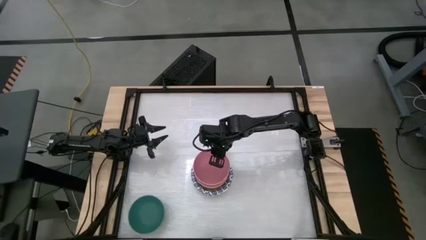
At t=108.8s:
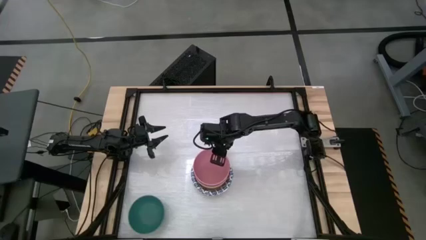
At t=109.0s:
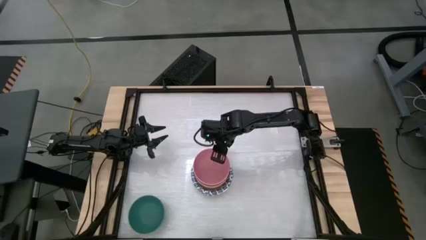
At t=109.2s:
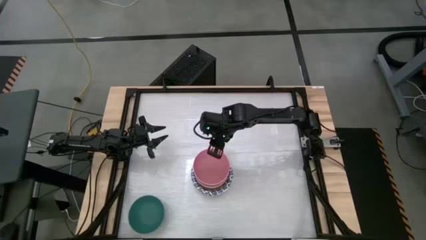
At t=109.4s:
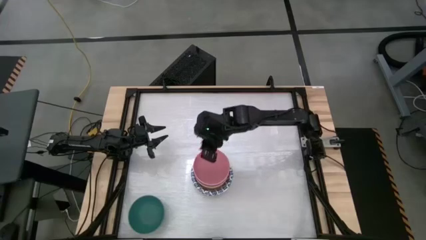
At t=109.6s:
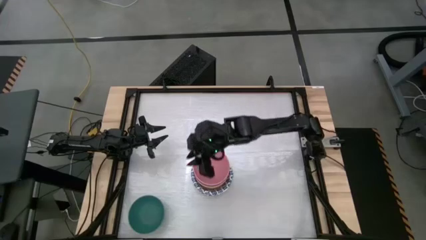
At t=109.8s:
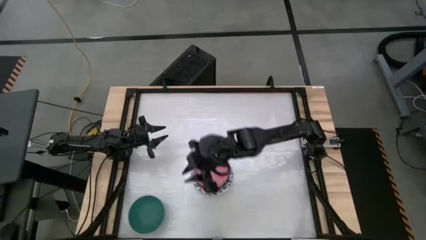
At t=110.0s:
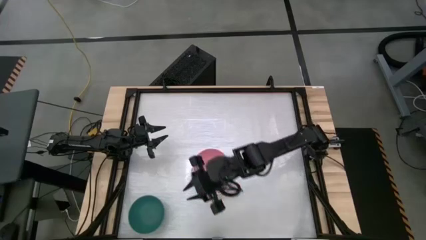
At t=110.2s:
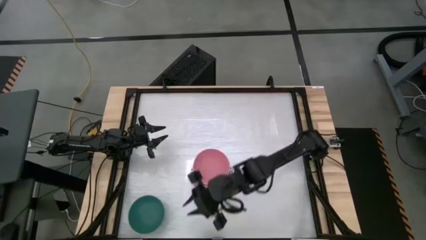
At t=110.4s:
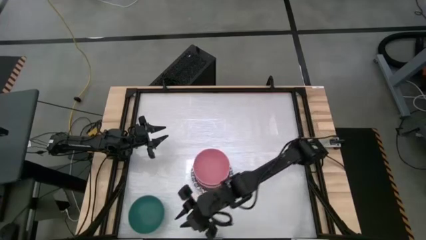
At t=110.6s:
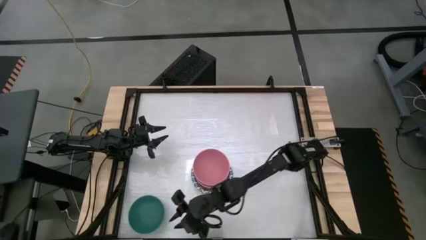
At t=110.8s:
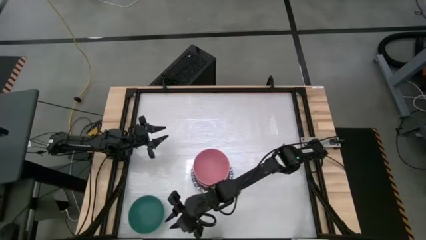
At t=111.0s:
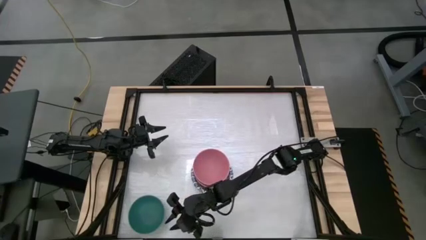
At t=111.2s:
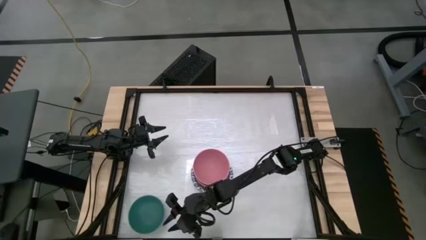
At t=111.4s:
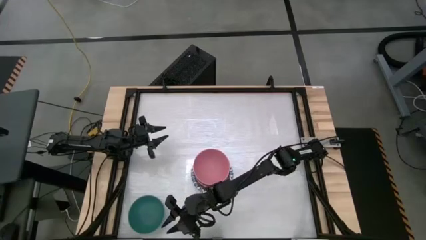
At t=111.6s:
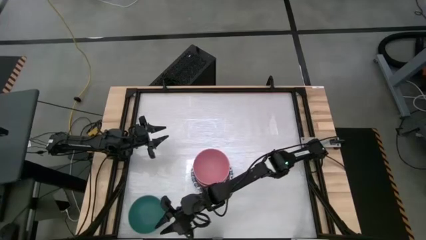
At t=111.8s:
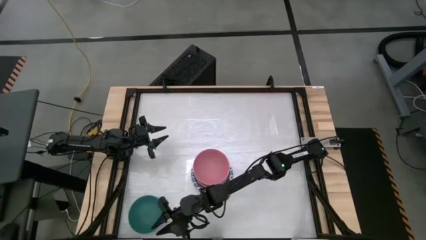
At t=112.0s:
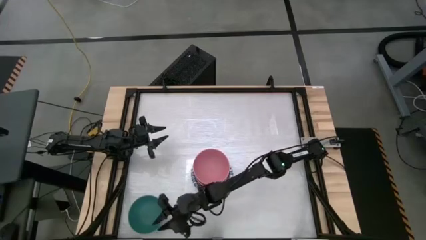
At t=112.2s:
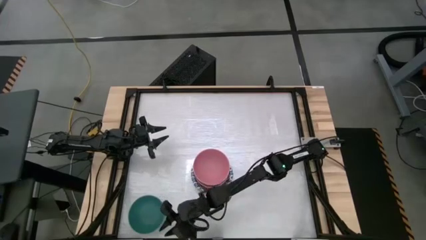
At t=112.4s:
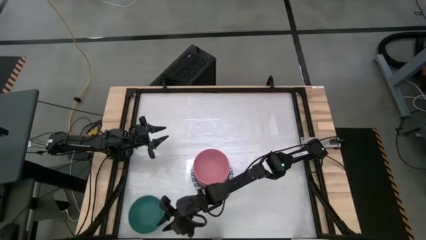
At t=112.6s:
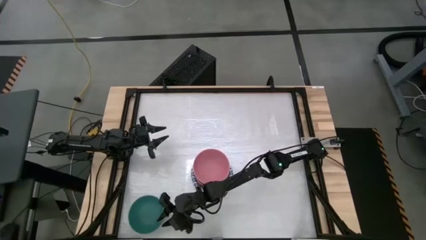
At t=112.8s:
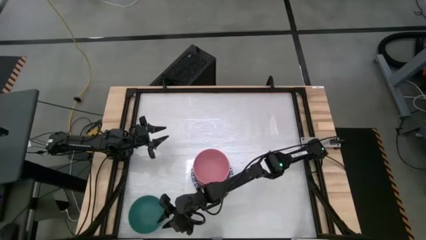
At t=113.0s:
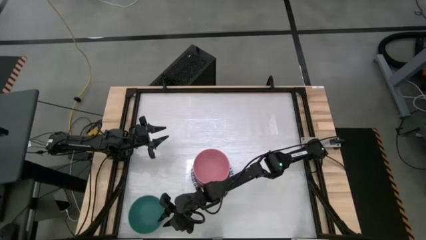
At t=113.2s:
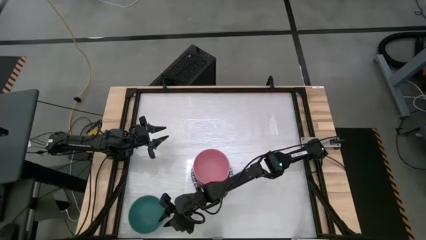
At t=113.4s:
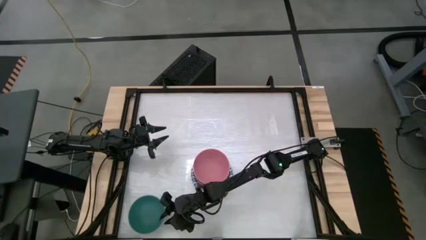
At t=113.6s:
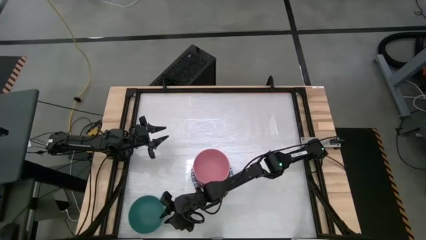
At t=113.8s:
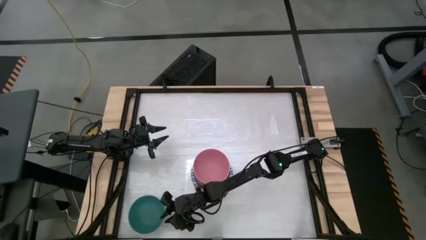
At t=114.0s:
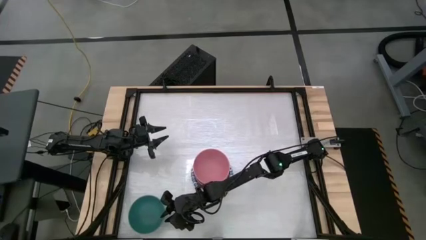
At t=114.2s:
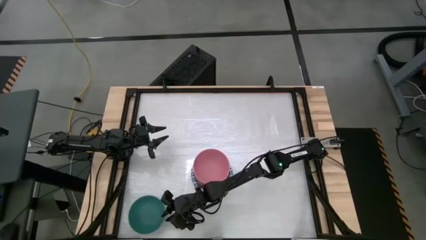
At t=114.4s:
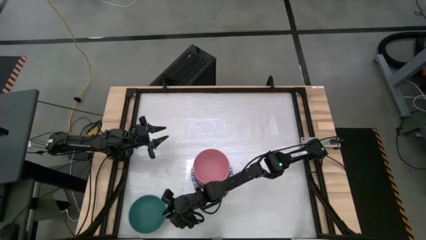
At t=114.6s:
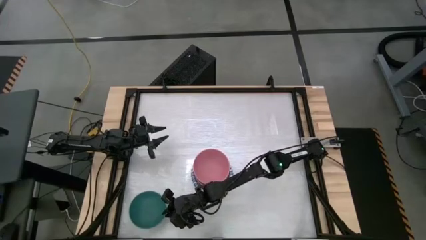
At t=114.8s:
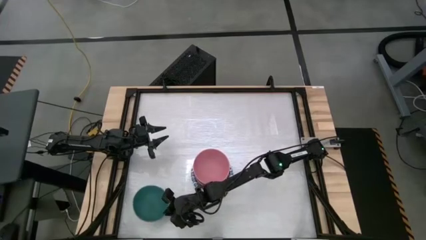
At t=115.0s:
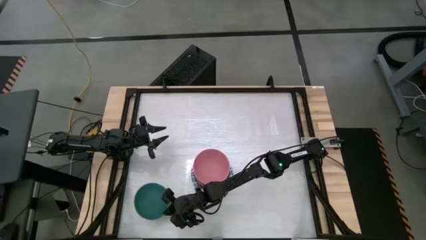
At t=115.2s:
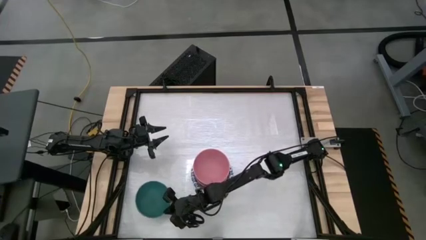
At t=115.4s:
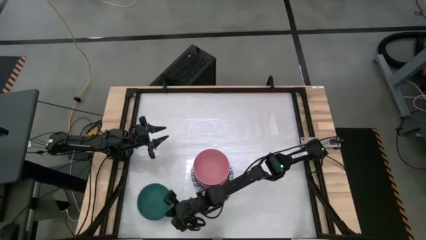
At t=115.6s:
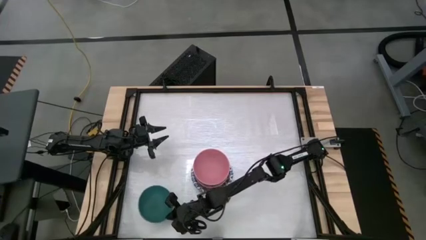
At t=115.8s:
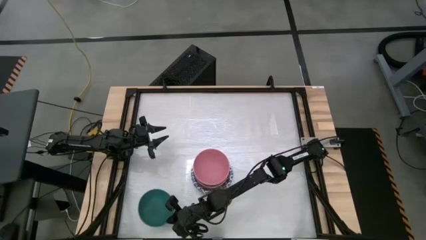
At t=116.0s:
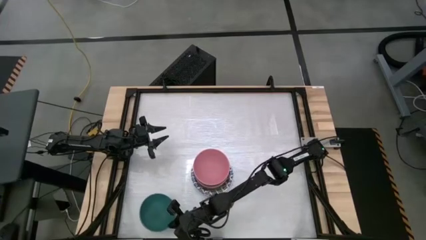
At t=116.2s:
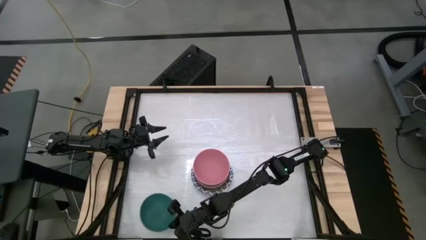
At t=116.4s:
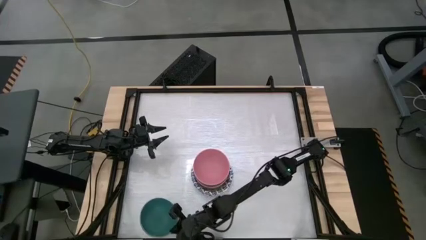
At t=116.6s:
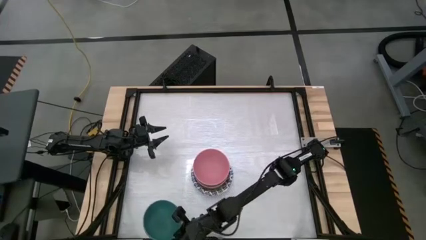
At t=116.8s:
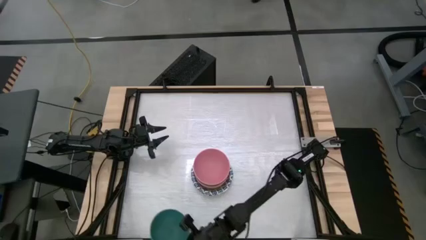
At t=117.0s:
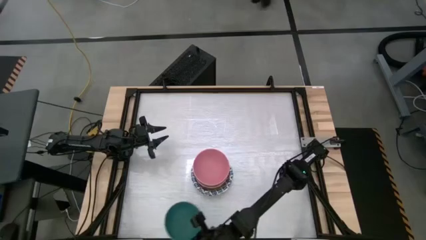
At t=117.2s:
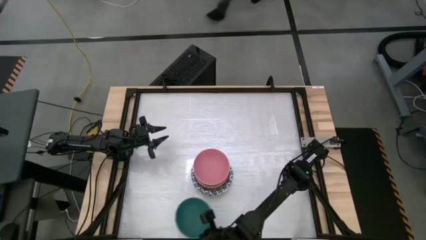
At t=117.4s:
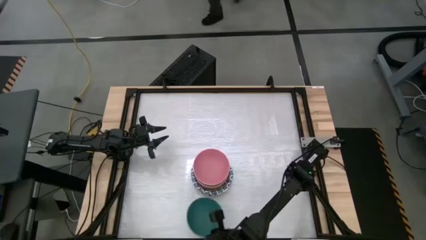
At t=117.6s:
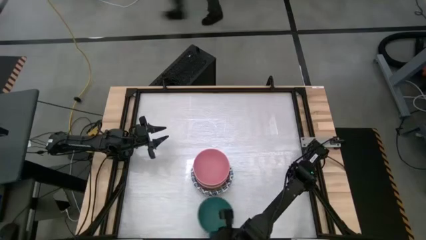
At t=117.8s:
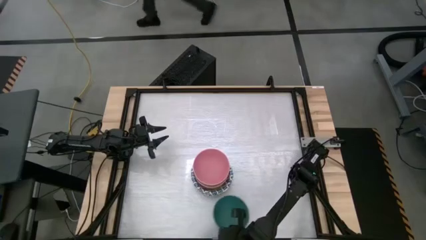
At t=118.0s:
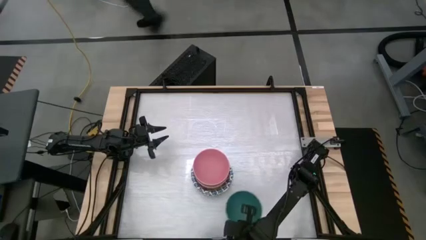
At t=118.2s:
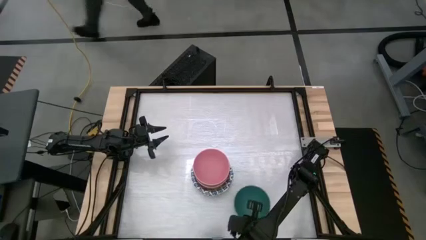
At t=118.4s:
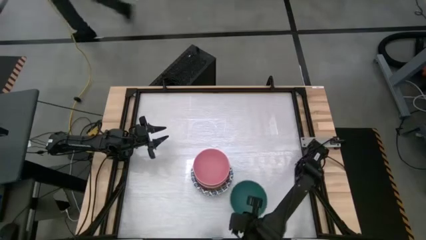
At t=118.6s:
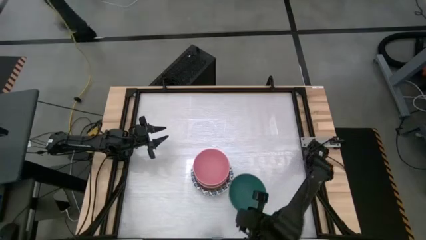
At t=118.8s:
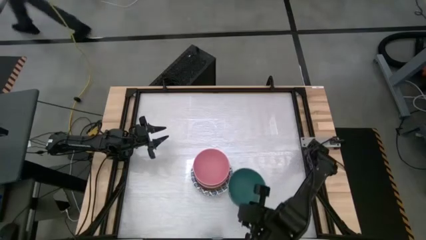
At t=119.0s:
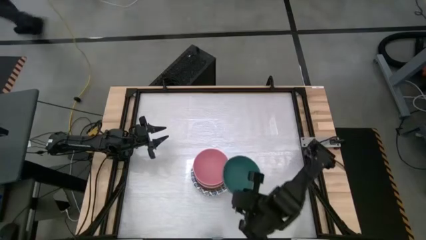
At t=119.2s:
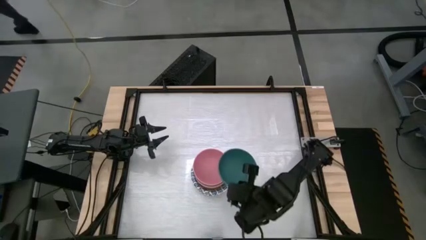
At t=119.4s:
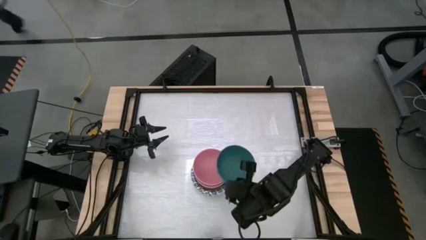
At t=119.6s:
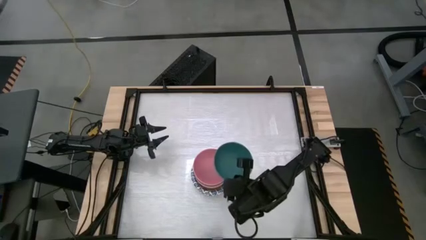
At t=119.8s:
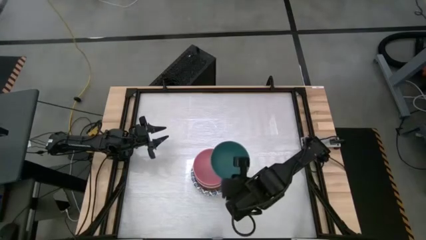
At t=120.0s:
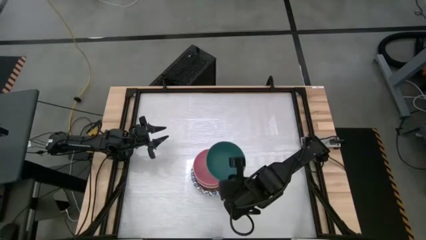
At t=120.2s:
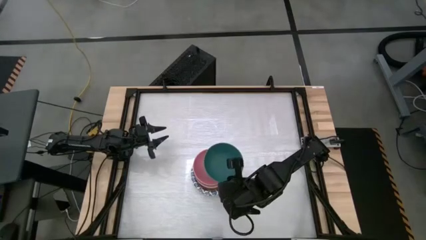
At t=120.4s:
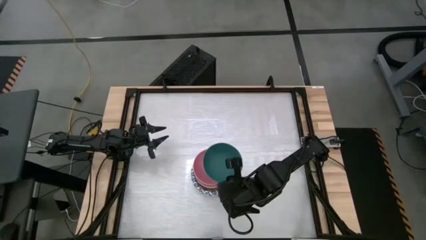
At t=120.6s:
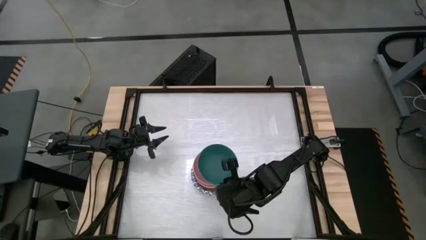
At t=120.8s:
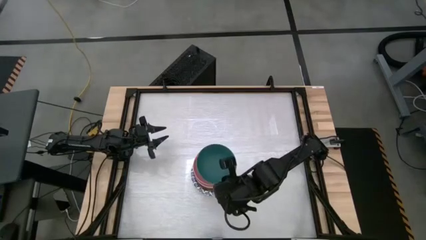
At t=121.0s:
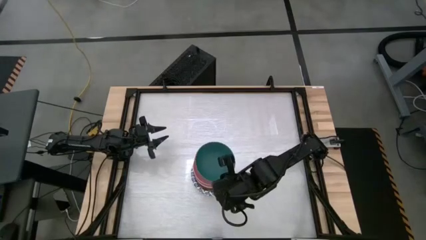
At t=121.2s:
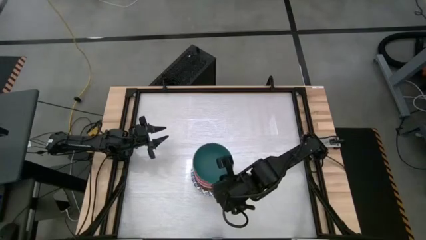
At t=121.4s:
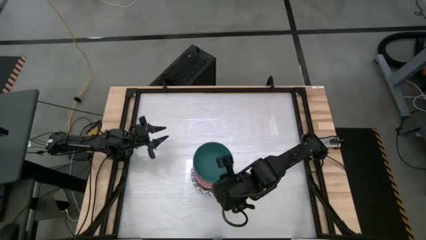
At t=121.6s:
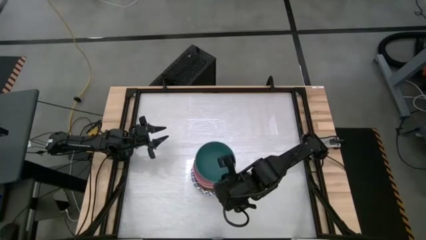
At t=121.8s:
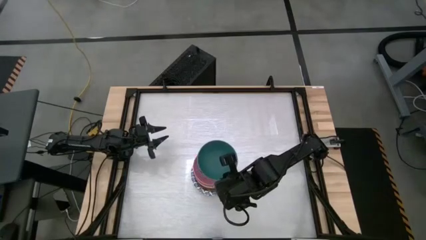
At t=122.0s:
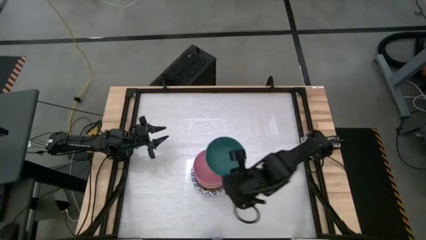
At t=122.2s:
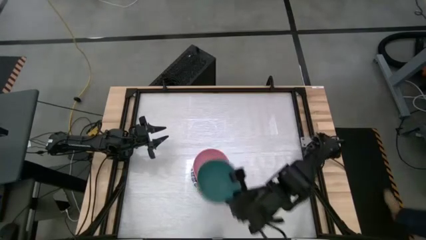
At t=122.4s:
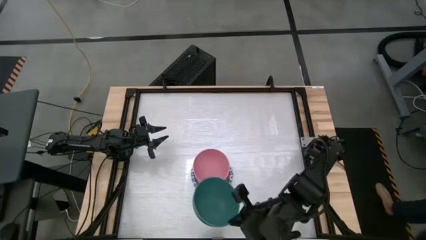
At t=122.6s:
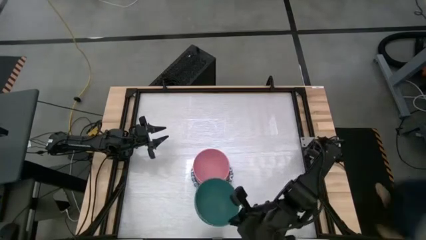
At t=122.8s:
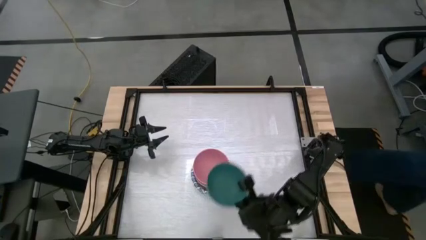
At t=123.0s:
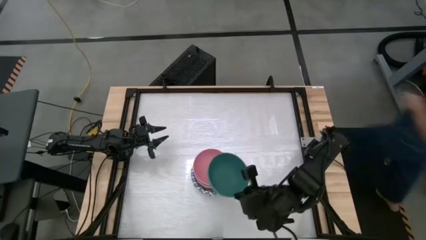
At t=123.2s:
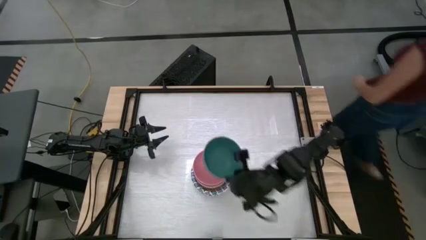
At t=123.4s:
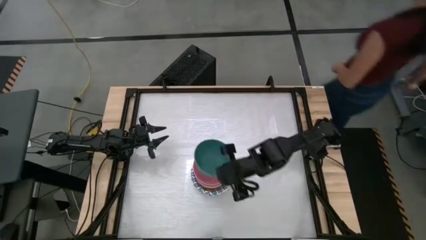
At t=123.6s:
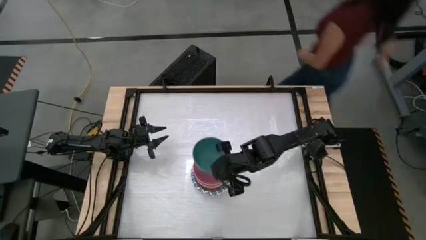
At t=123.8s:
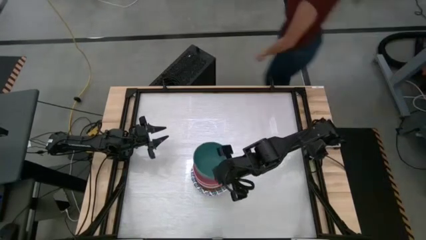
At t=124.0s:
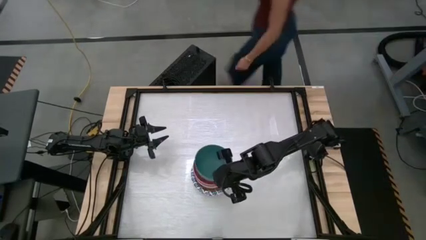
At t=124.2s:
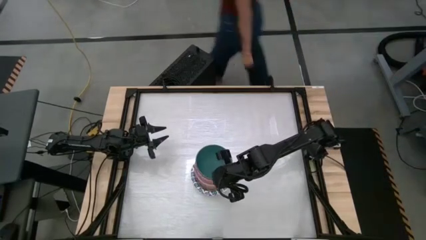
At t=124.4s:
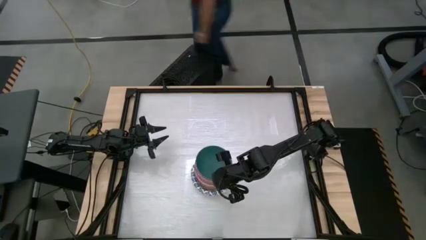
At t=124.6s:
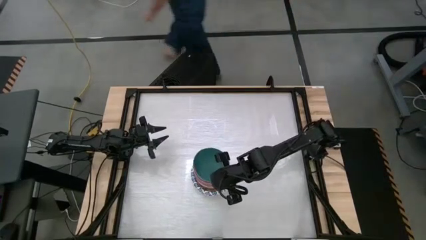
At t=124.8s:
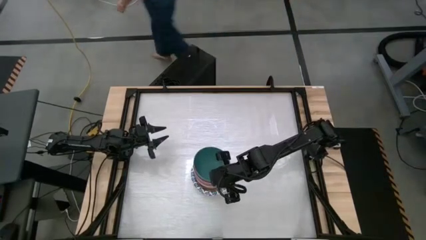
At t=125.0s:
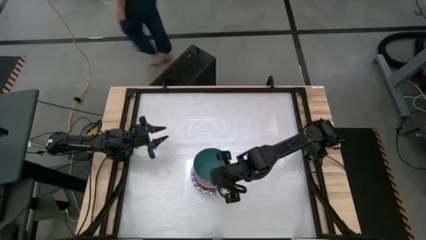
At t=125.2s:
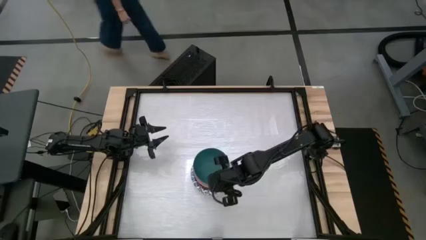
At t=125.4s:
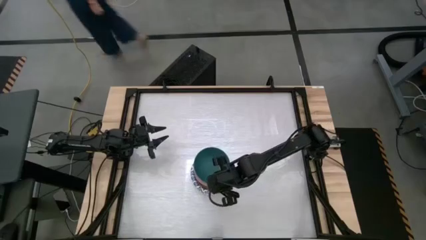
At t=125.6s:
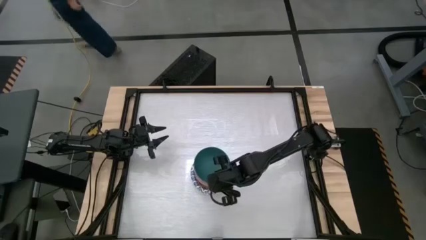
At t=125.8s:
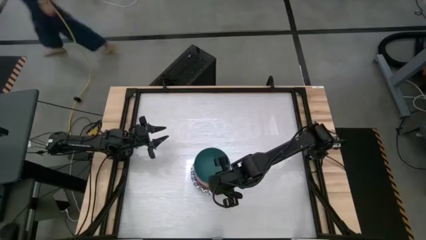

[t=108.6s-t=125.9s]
Task: Nest bowls inside each other by size order
Stack the green bowl into the pink bowl
